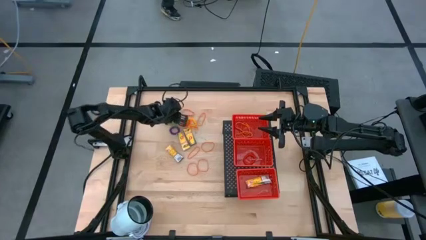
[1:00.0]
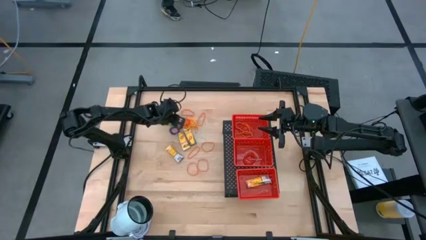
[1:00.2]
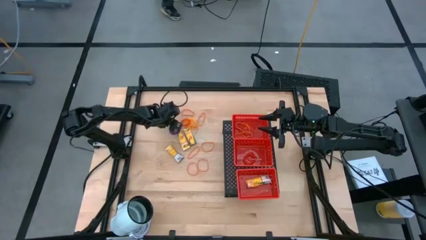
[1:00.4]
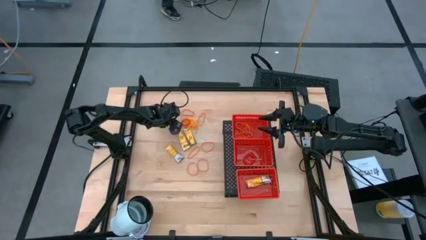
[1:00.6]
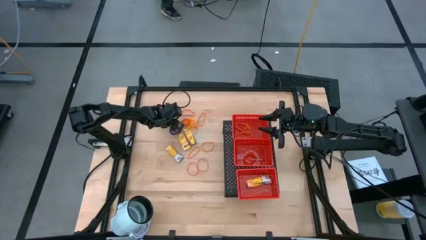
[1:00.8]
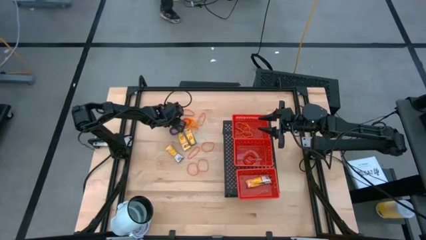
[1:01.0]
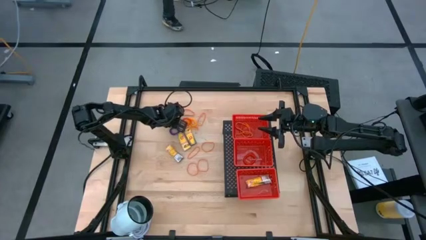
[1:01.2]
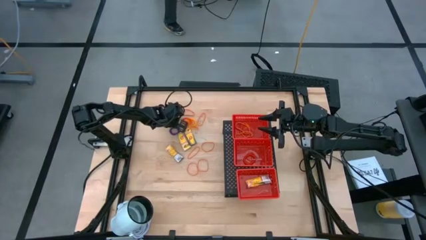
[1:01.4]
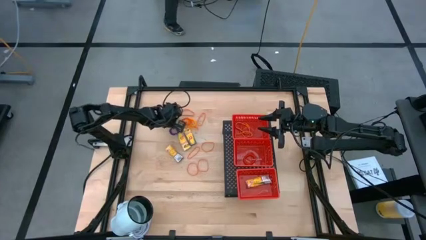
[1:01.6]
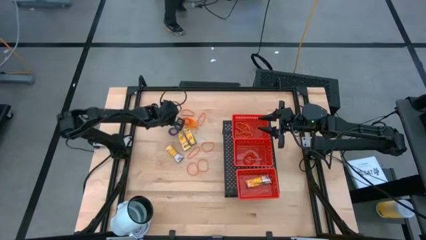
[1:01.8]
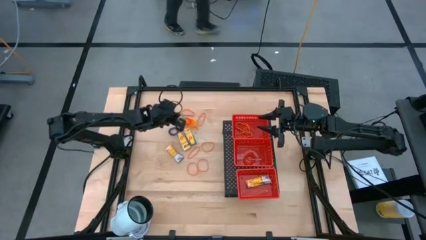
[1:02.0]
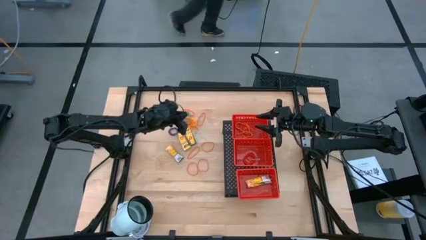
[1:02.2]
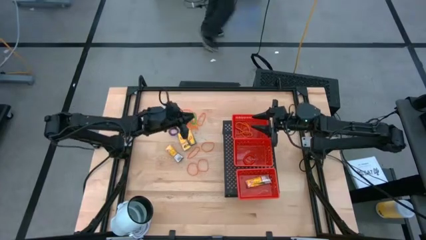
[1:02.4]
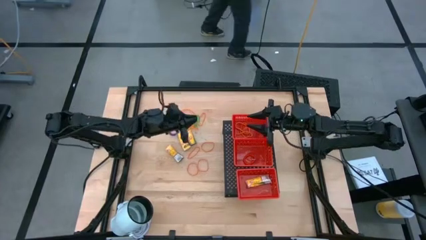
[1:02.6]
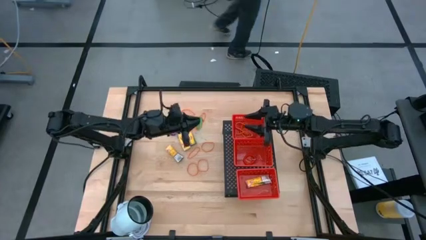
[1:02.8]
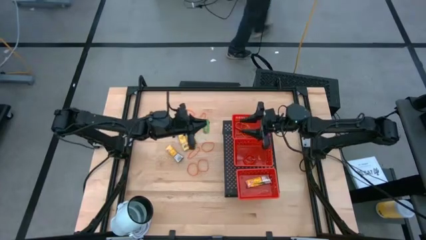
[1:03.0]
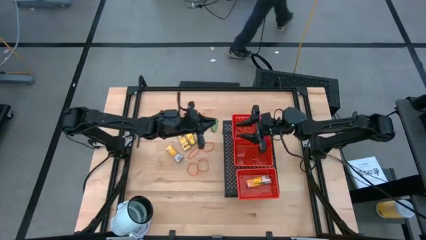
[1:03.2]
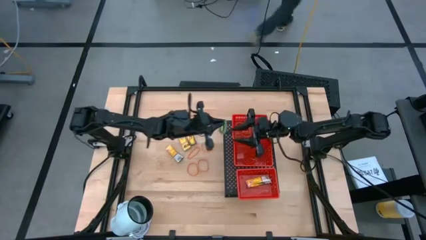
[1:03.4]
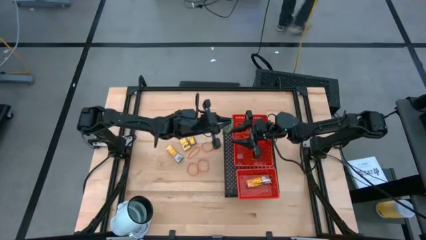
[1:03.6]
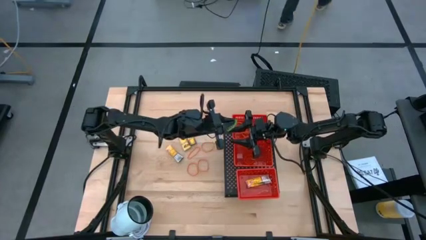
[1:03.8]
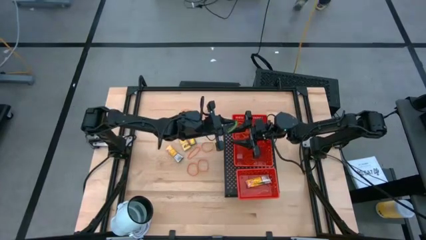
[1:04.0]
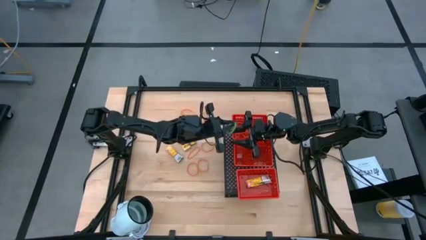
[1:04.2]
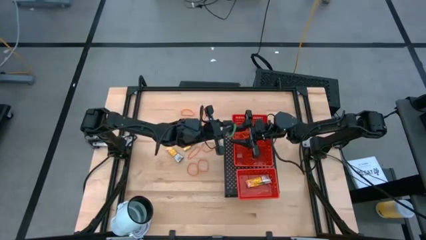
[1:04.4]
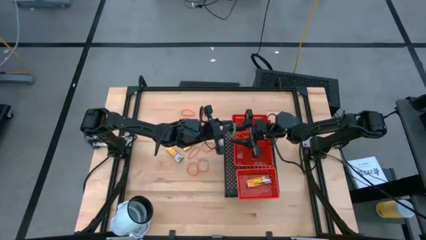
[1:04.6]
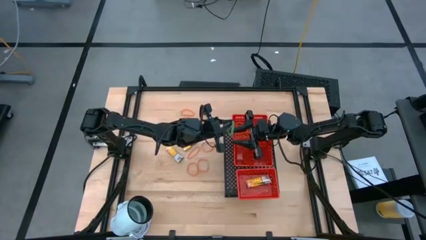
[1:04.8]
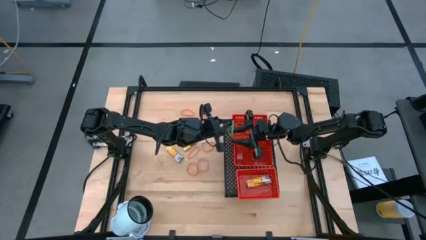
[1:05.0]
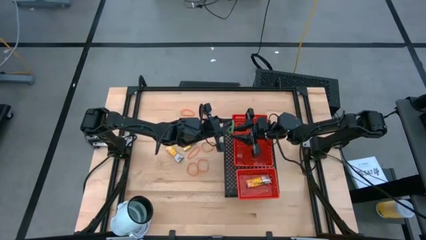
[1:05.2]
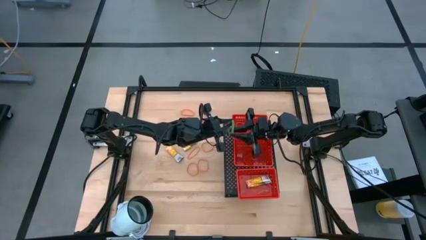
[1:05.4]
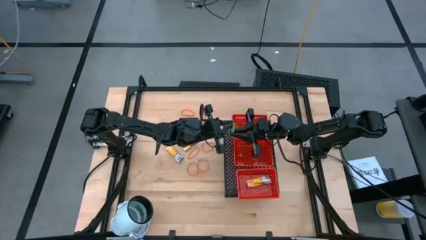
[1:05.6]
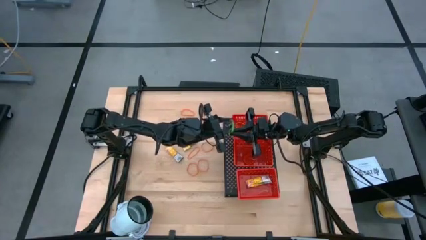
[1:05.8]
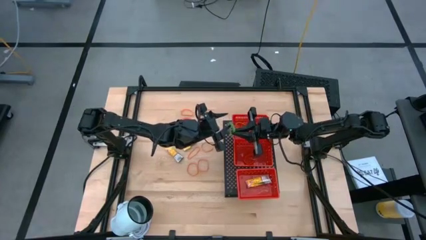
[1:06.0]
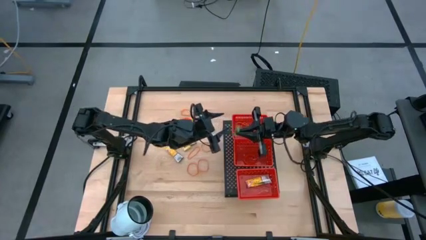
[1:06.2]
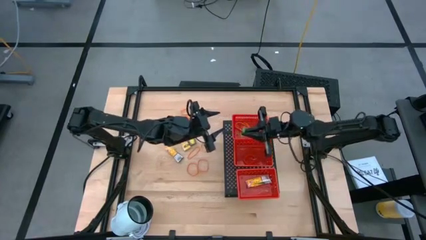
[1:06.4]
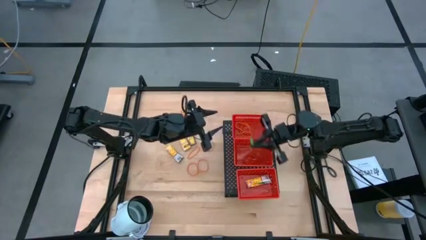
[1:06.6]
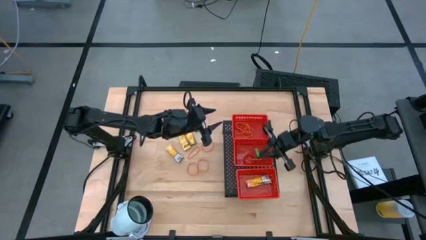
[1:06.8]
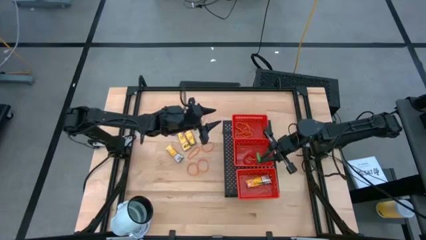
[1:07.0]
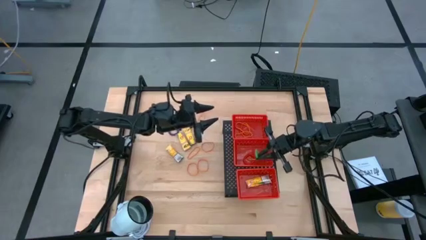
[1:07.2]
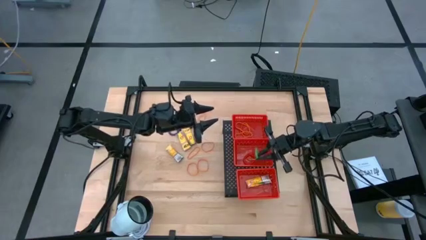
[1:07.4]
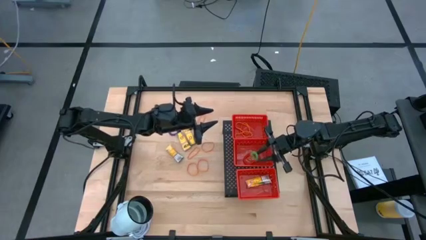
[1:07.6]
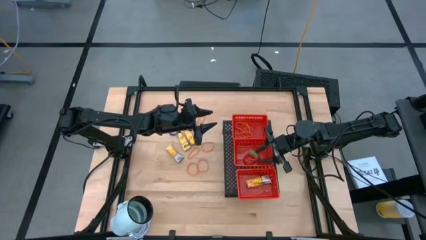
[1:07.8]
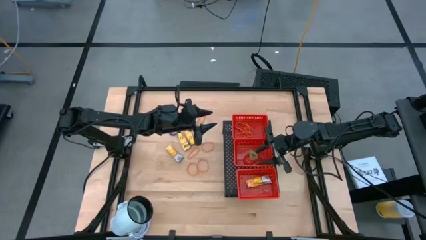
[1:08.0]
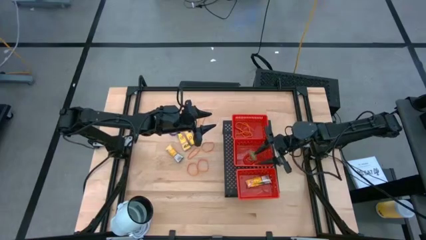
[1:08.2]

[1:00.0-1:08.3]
Task: Pick & Place Office Desk Supplies
Put the green spring keychain into the middle red bin on the shelf

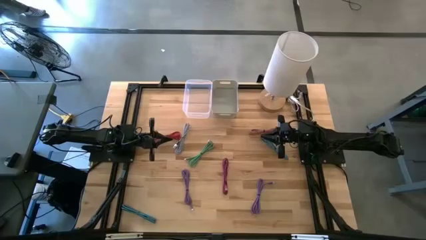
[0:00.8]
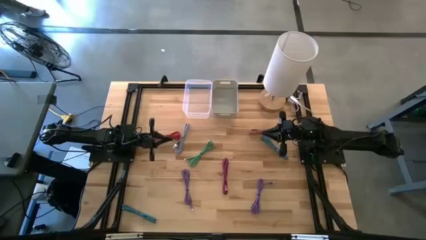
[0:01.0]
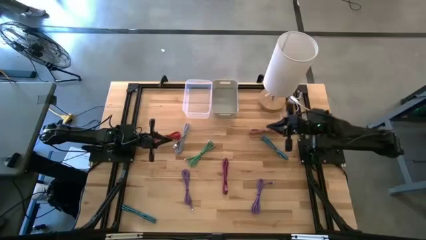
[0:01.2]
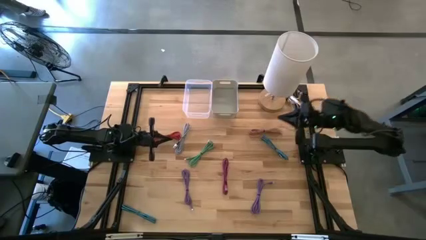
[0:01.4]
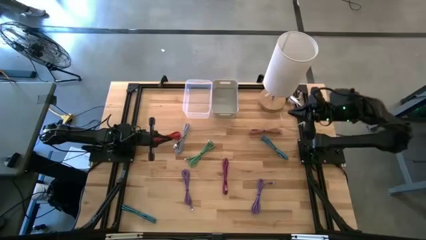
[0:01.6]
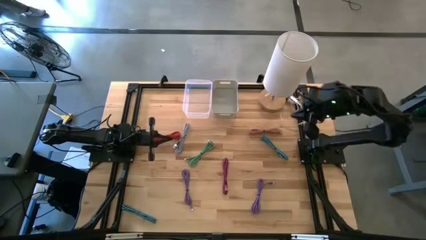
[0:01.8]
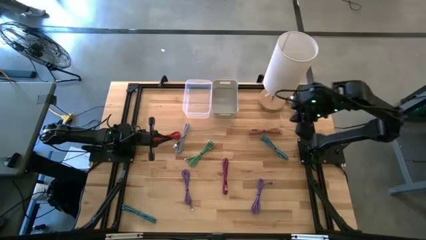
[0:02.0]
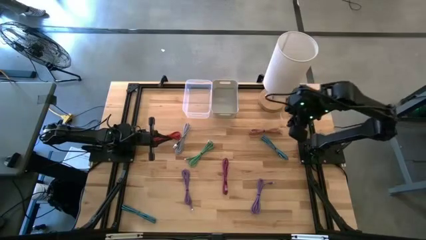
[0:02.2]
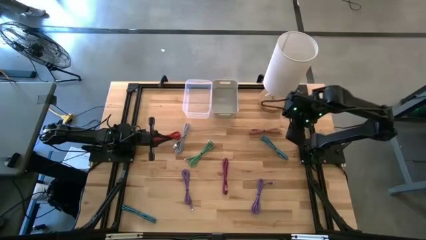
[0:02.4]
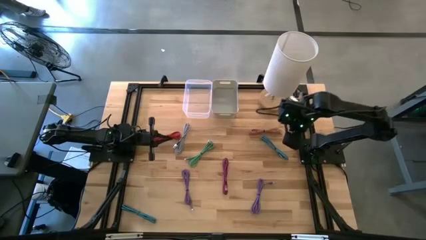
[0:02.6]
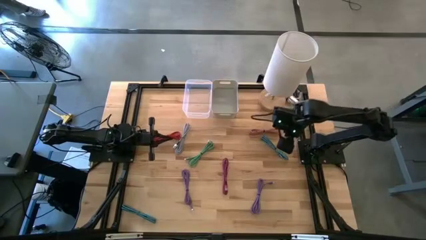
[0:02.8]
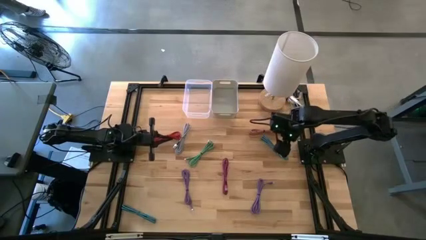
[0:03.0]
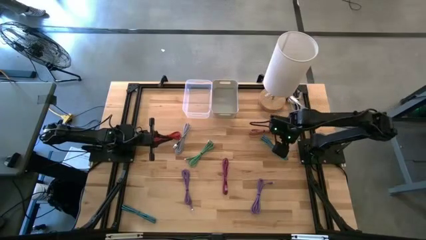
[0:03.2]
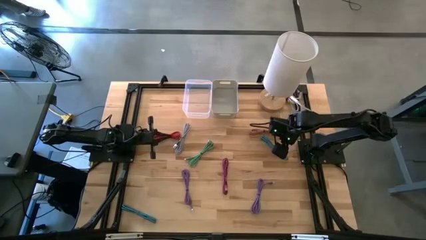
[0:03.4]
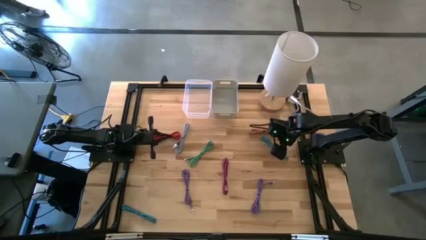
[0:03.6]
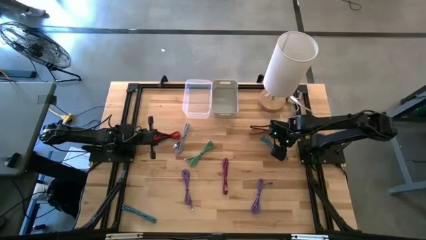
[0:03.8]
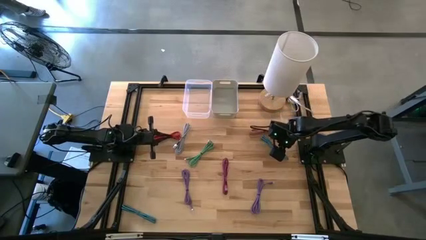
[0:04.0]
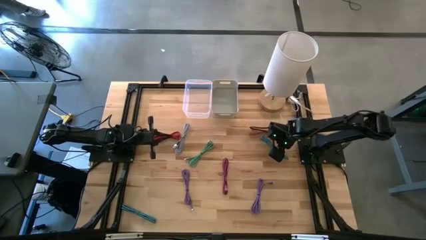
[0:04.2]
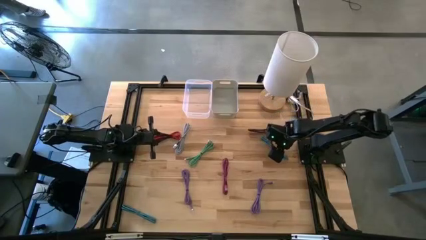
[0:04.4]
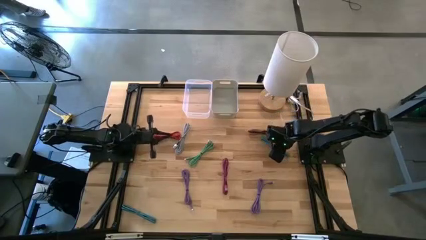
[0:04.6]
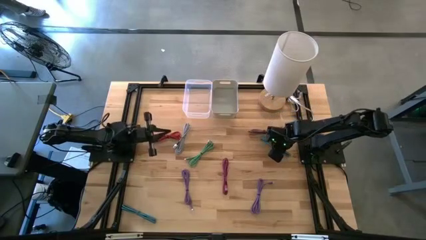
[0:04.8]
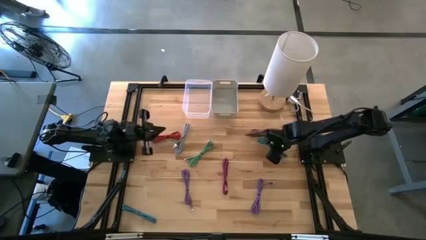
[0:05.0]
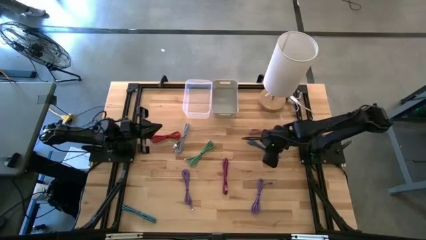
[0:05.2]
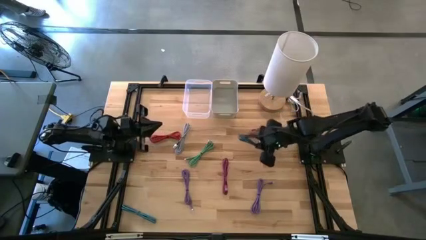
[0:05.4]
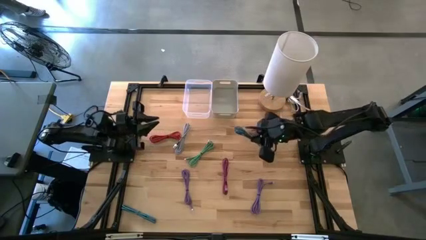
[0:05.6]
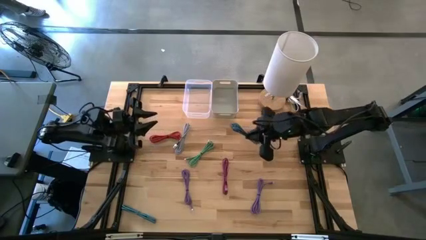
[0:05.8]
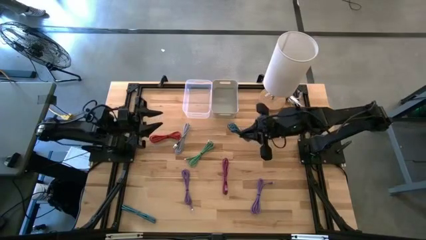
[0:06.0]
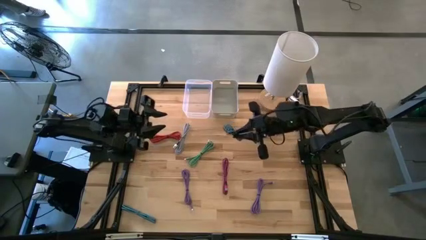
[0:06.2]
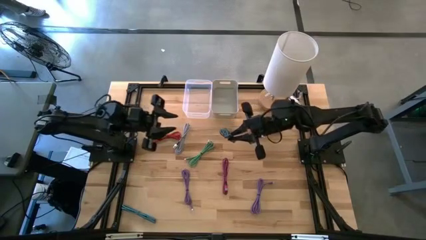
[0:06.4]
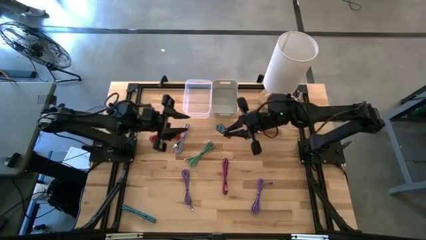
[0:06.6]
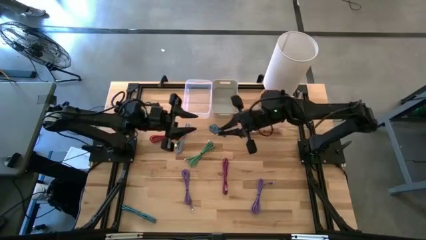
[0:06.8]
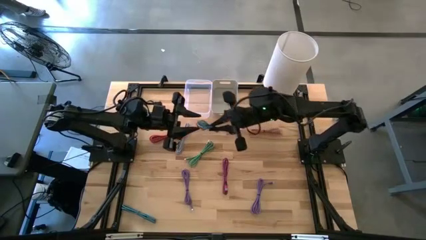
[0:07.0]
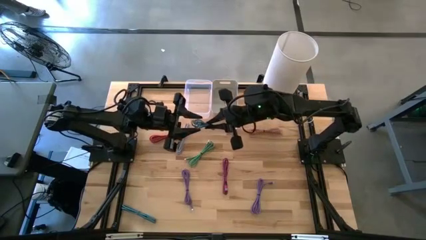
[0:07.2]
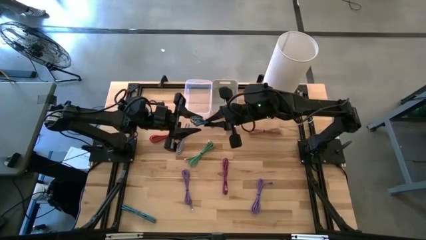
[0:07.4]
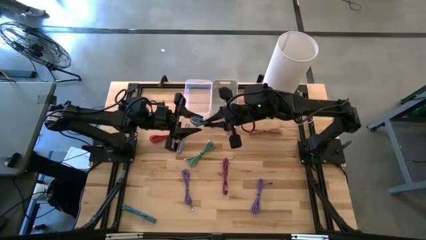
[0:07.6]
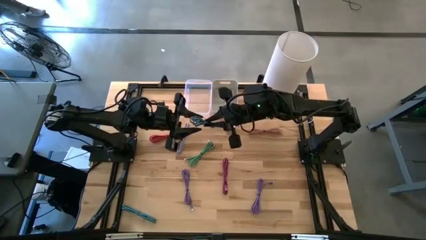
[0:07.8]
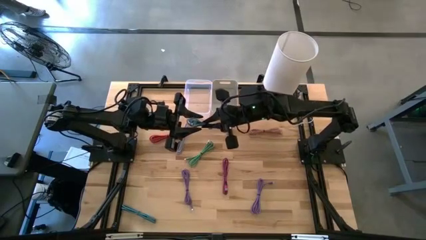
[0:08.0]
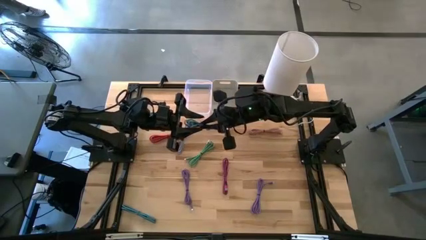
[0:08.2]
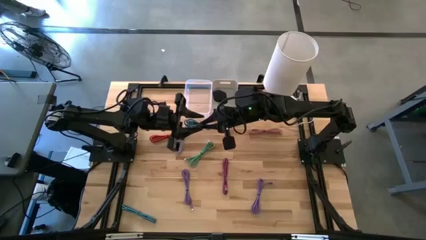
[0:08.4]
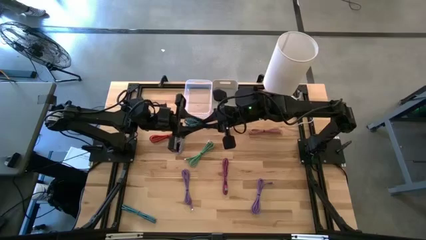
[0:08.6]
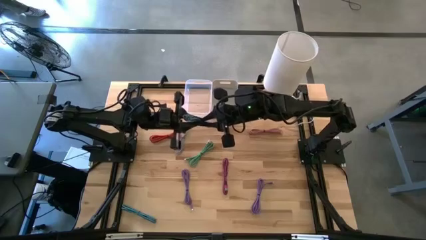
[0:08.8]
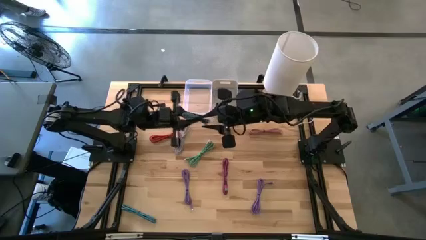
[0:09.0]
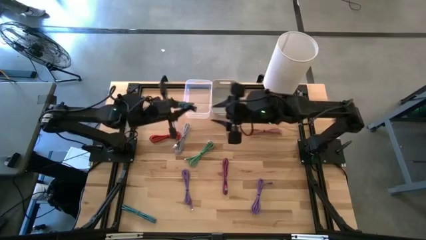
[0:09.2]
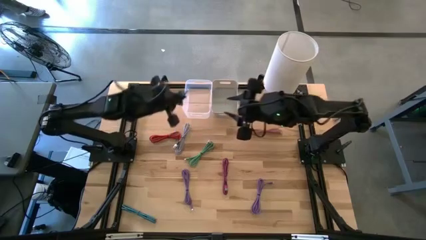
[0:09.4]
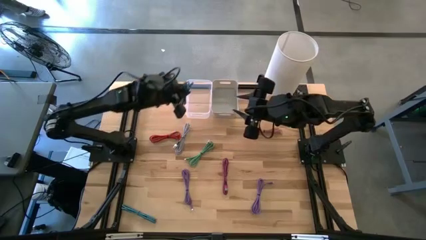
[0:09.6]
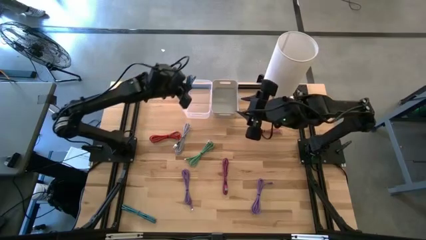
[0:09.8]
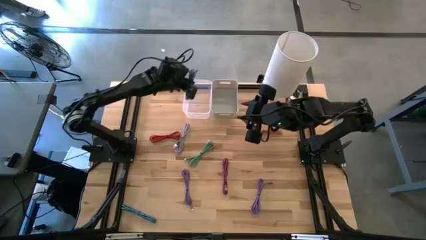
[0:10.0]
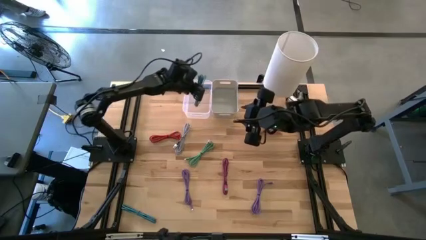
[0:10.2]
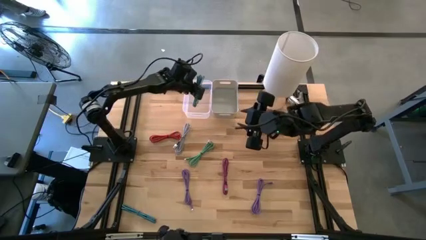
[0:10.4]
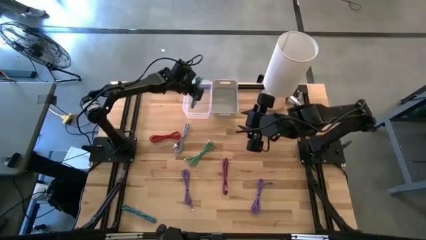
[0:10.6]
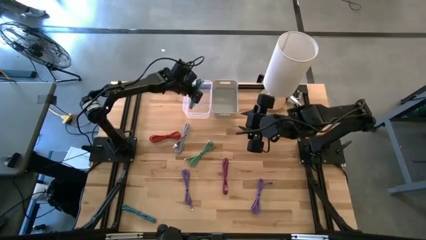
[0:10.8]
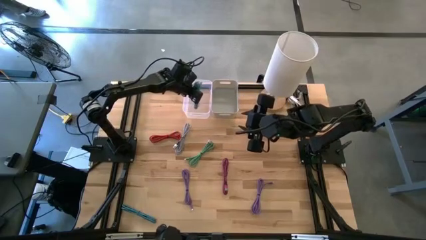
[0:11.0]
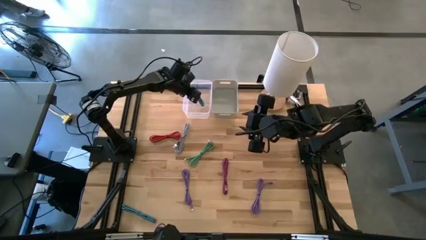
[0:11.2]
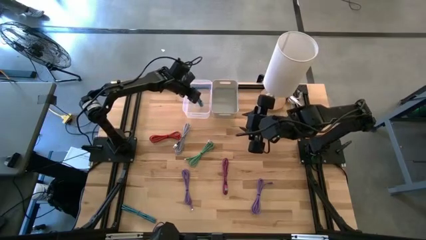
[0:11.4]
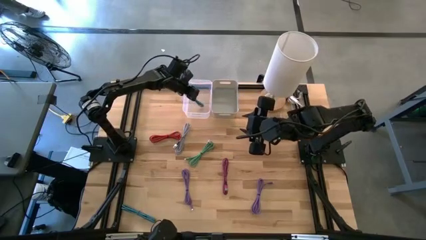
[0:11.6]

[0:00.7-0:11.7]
Task: Pick & Place USB Port
Put the blue and black charger cable into the transparent bin
